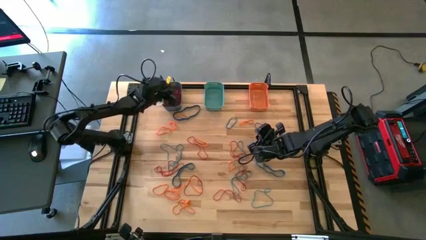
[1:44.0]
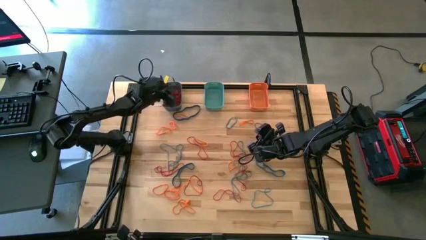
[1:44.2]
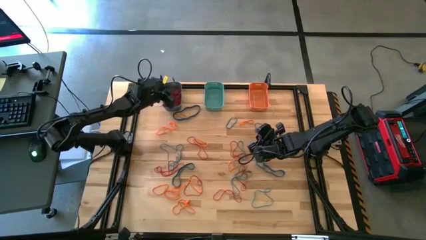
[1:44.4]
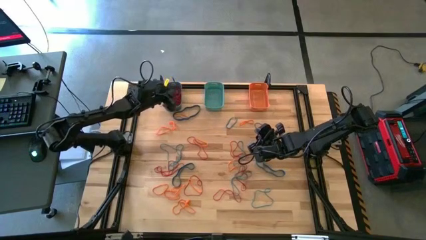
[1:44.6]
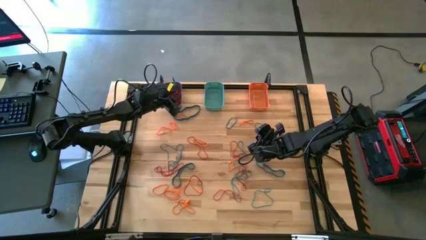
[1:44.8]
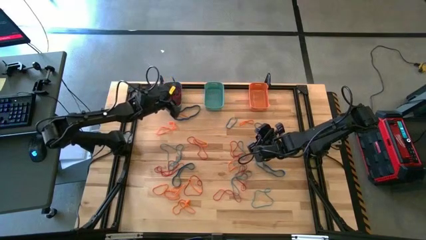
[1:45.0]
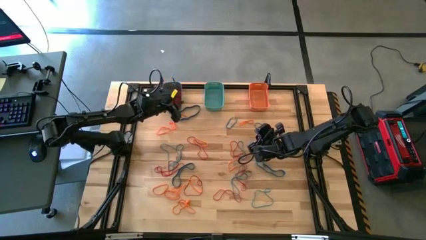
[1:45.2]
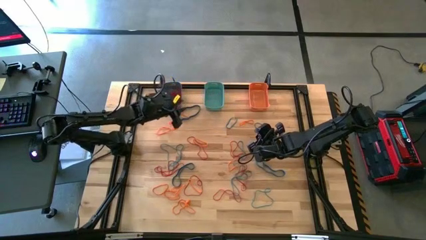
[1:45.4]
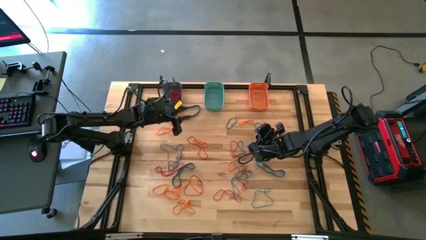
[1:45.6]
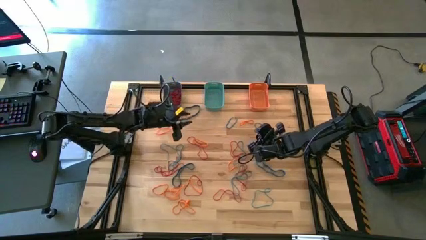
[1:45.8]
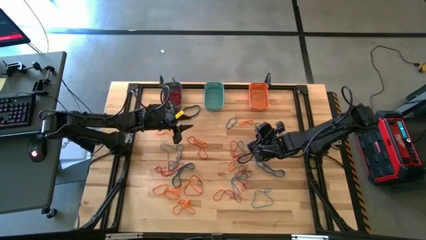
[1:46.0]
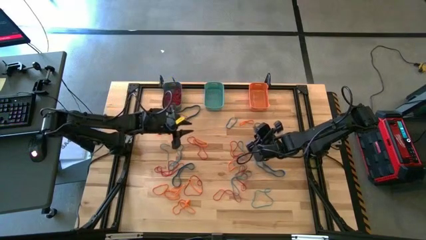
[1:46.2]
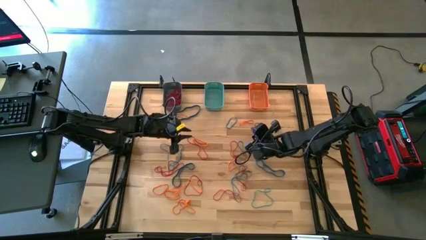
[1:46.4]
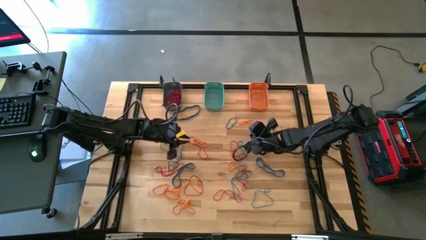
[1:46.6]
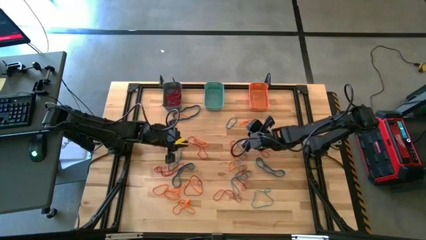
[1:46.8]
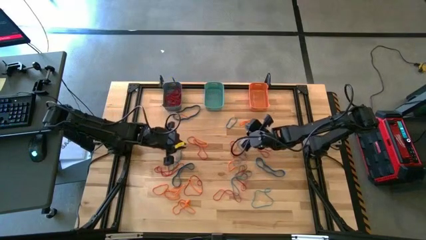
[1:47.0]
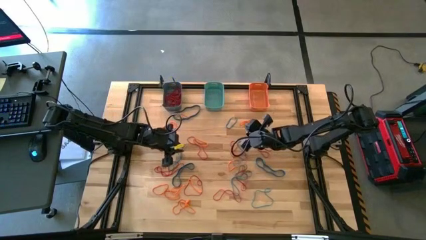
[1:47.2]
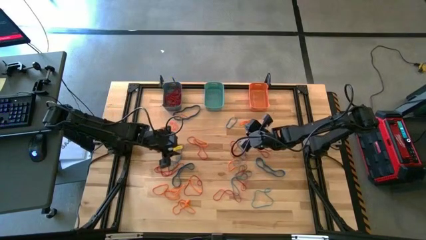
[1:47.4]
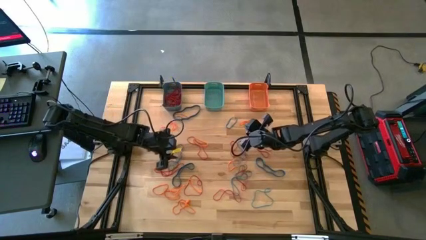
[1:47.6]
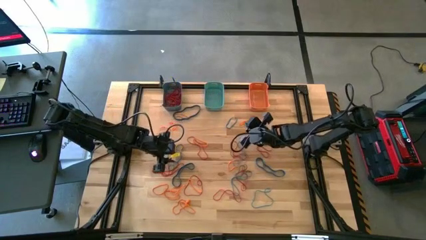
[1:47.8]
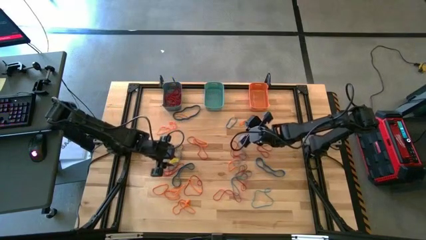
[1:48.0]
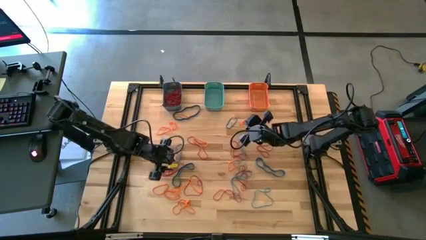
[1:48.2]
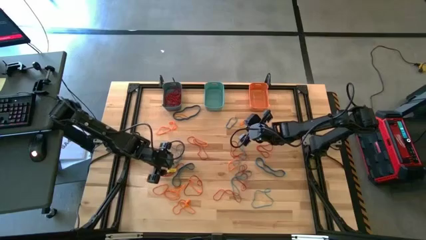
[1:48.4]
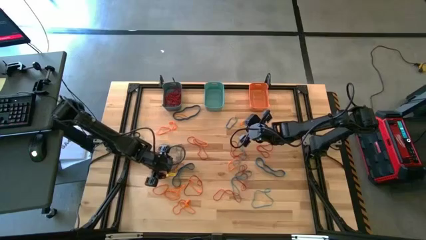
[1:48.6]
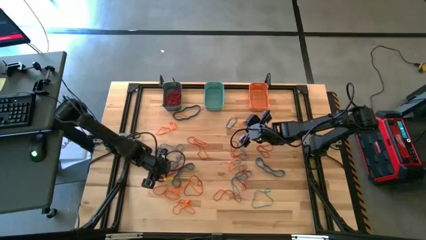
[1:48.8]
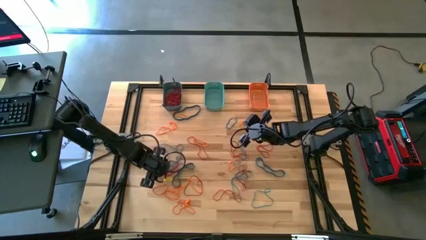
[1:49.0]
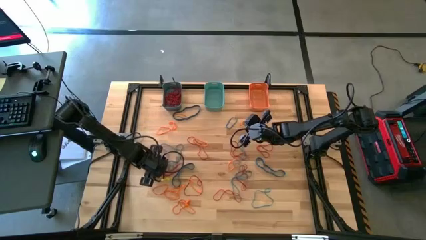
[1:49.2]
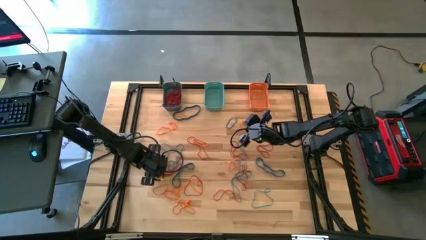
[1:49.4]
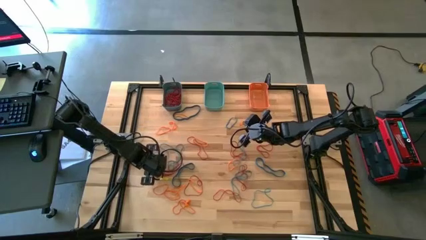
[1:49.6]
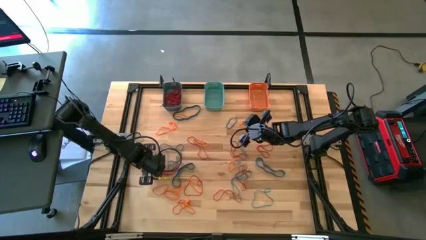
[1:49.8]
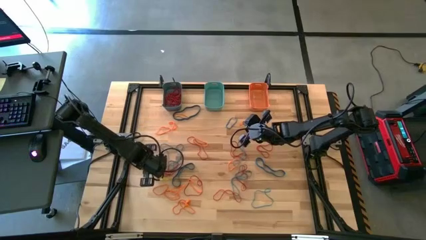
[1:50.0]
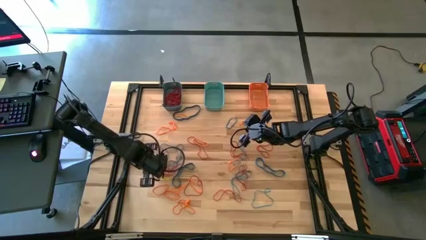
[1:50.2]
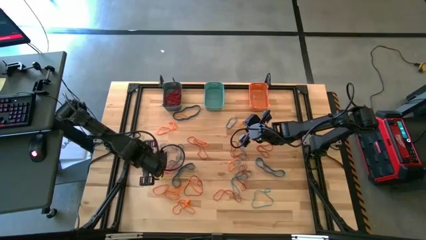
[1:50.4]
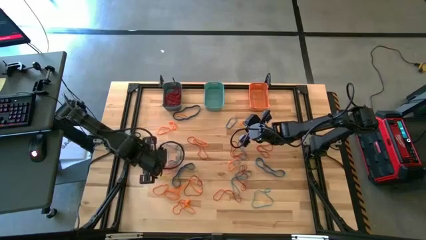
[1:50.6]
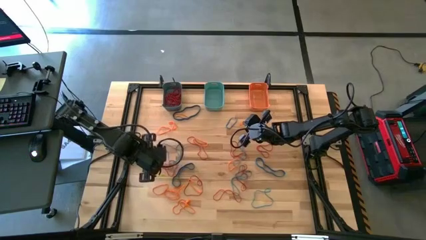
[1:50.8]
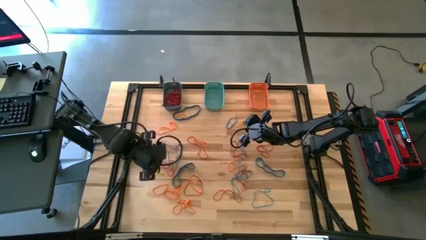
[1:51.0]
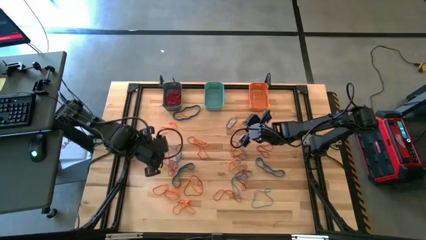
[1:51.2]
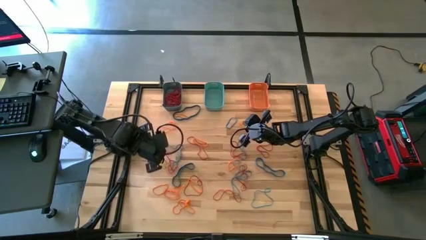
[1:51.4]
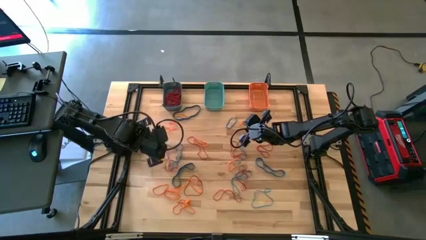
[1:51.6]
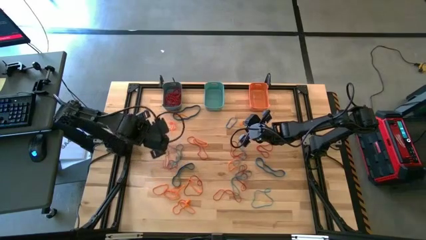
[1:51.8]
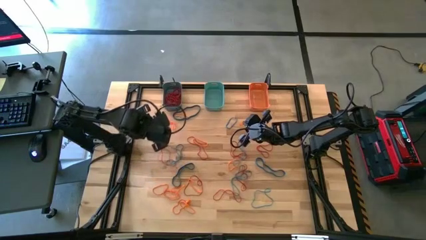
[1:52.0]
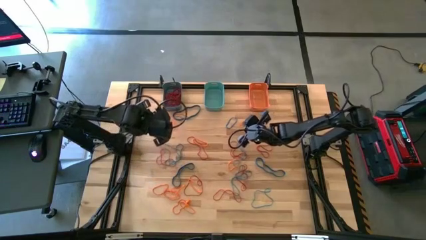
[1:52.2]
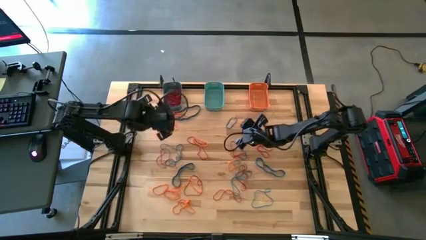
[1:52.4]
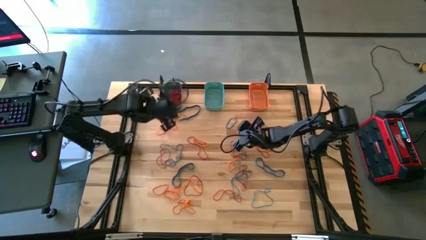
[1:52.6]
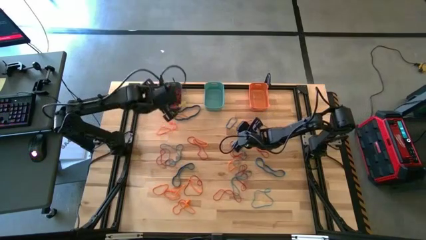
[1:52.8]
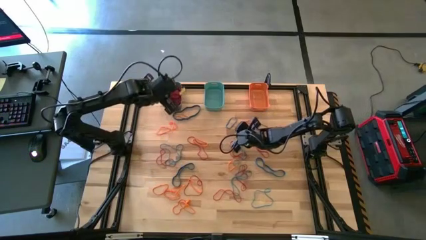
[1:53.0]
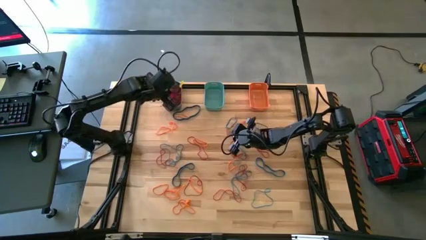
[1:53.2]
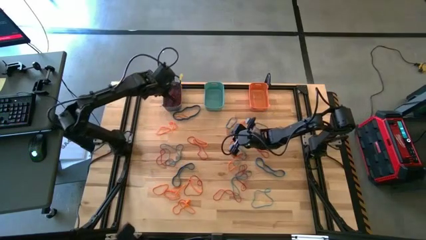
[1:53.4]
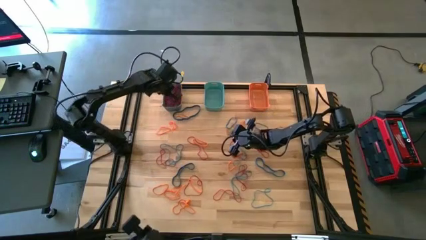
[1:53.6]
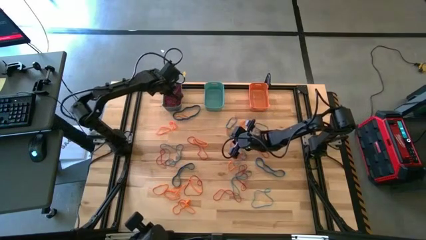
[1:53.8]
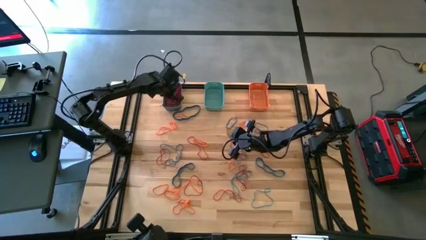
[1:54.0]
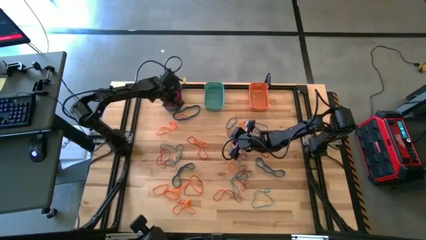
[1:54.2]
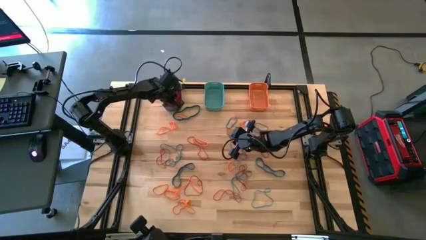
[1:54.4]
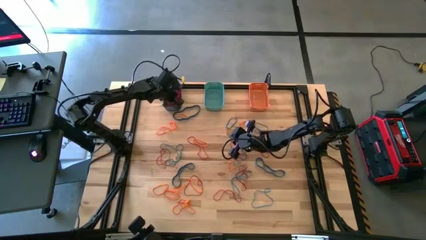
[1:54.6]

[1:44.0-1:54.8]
Task: Sort rubber bands into baskets
Put the red rubber band into the blue bin
